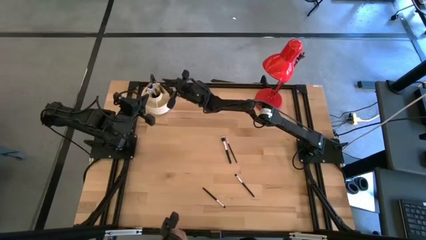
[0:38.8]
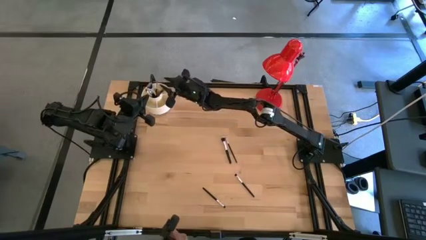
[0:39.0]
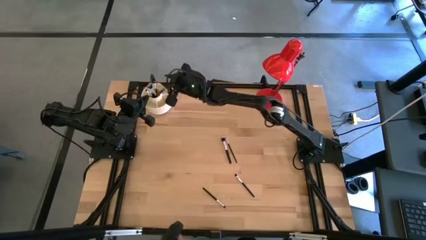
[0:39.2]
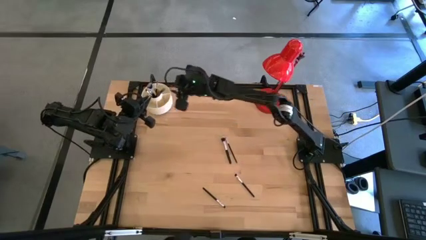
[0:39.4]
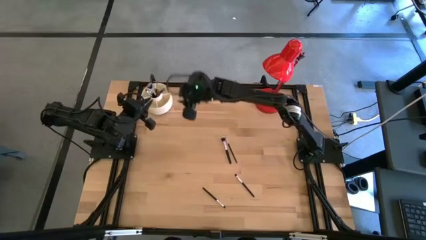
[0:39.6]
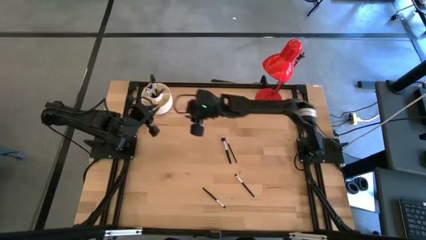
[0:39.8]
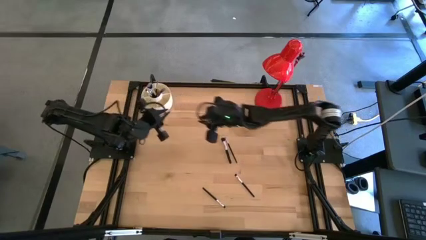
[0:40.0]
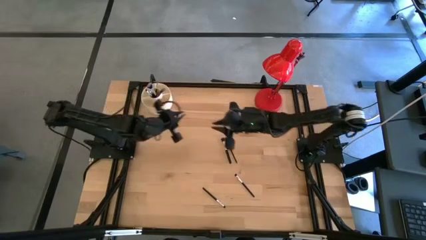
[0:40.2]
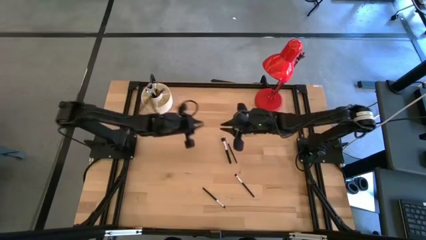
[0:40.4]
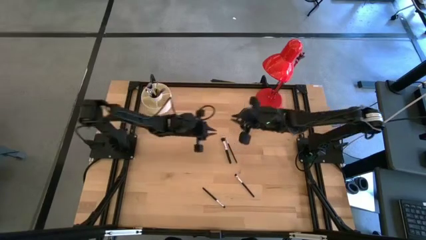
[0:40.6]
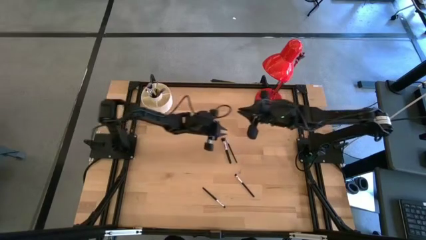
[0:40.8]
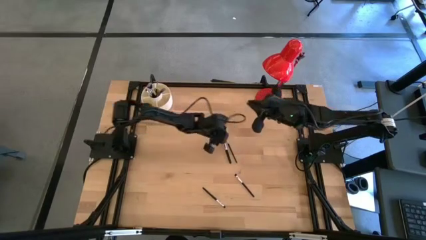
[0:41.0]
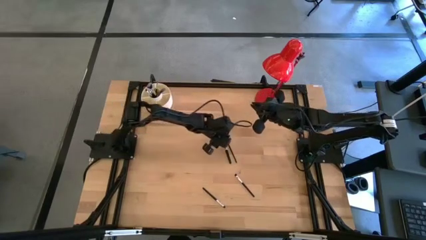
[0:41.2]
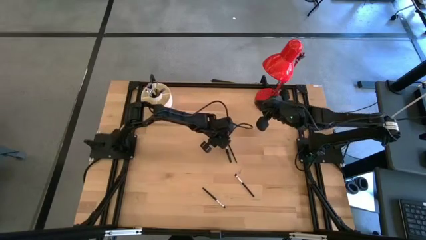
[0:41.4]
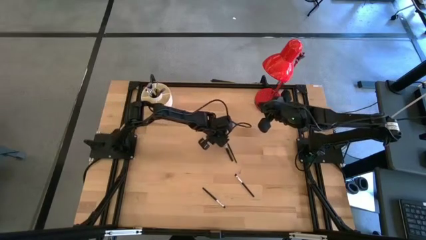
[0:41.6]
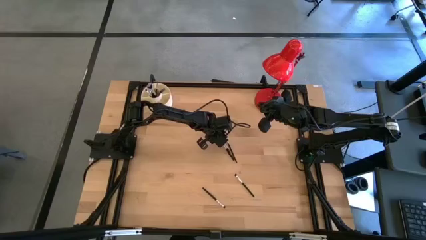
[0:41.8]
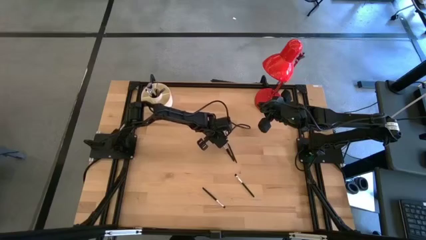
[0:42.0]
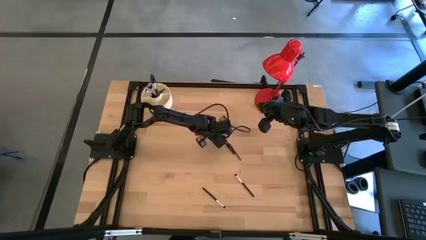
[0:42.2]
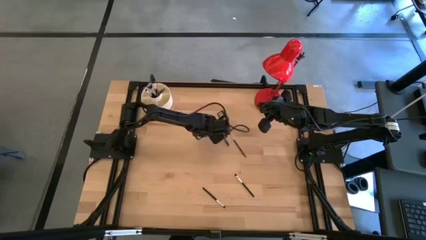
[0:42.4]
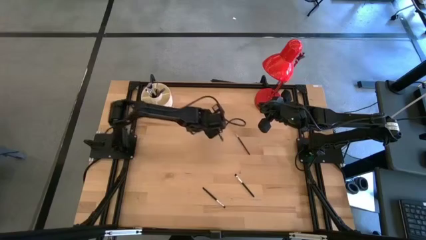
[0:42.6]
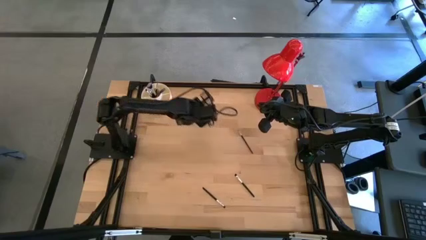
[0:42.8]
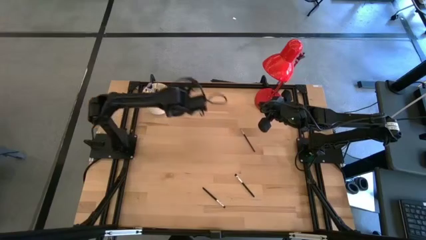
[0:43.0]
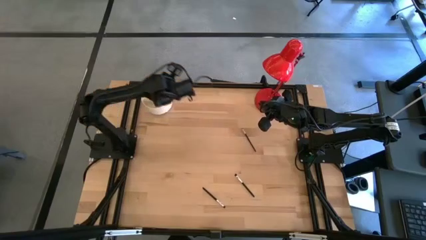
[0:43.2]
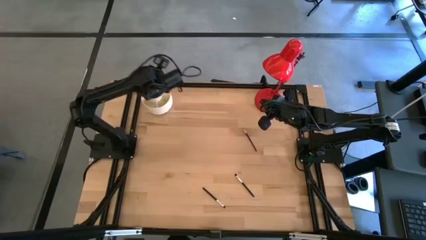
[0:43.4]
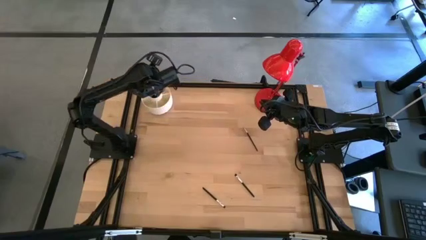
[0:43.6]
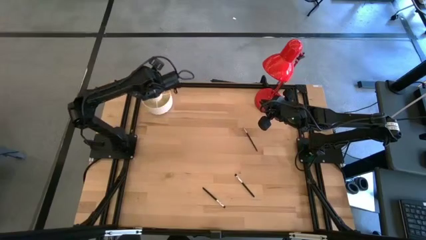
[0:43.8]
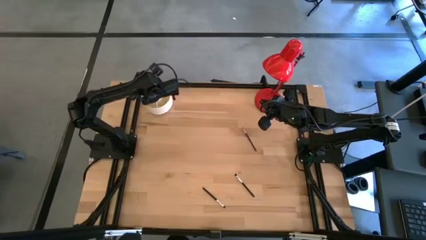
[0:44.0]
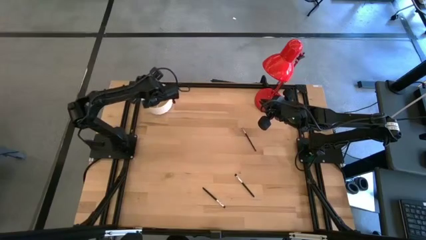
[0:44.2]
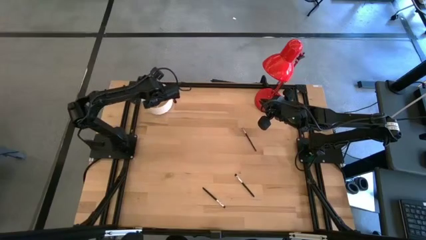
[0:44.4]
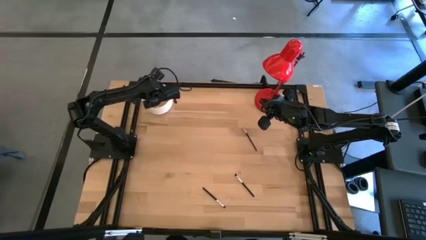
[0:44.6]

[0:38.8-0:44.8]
Task: Put items in baskets/containers
Put the blush brush into the organizer

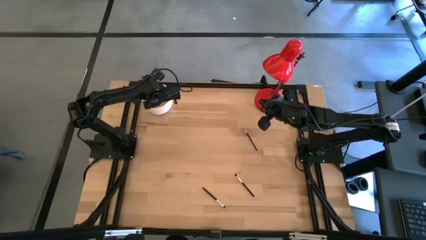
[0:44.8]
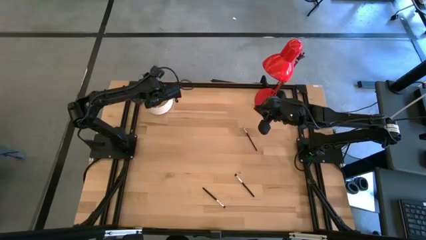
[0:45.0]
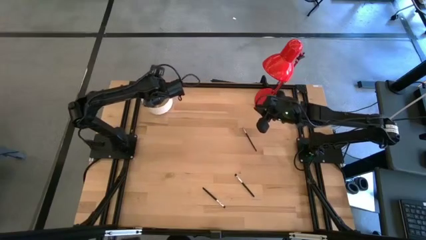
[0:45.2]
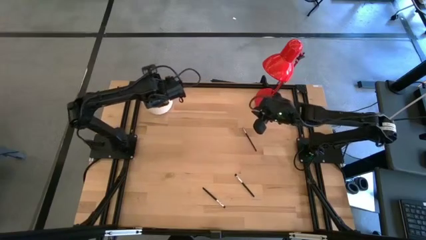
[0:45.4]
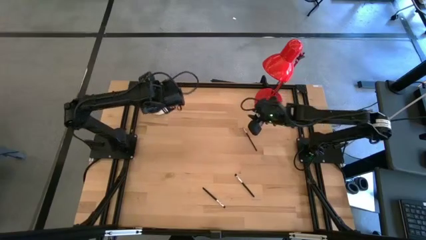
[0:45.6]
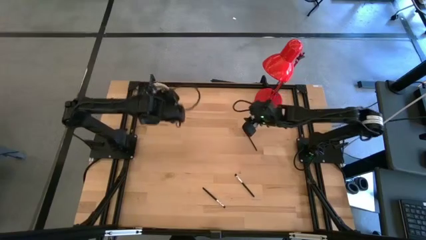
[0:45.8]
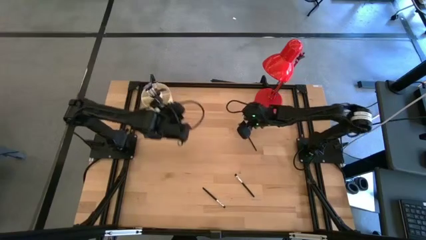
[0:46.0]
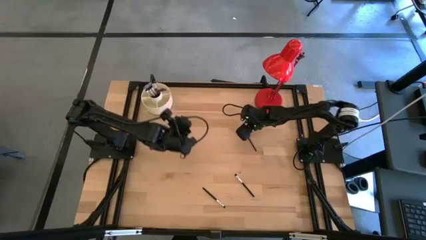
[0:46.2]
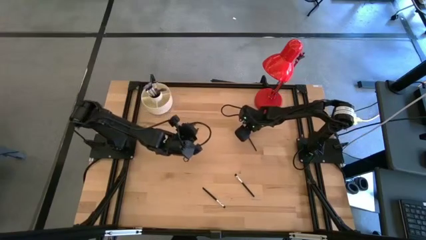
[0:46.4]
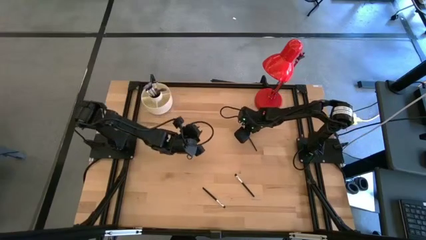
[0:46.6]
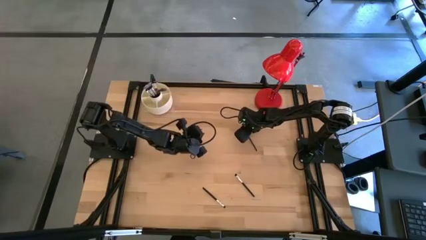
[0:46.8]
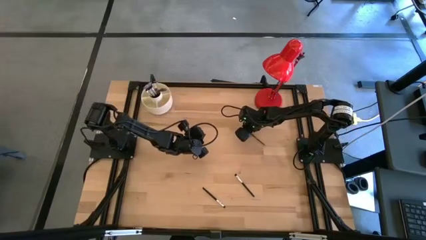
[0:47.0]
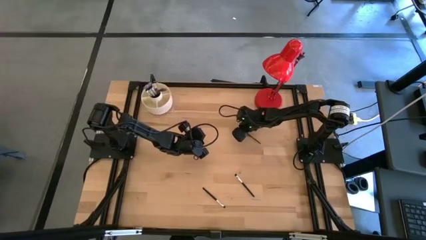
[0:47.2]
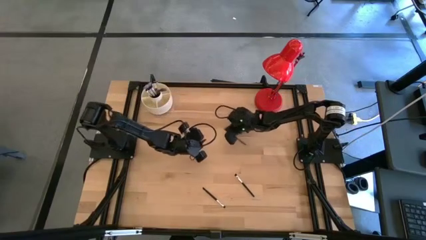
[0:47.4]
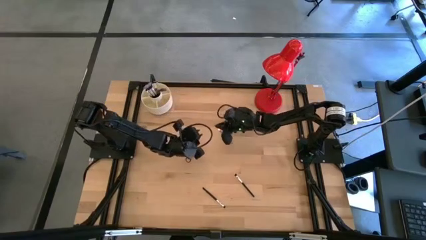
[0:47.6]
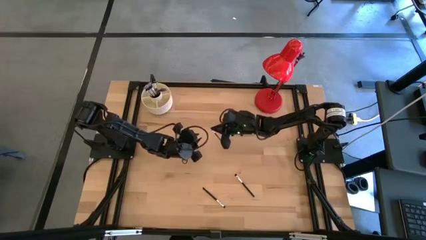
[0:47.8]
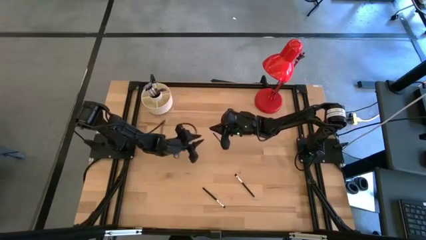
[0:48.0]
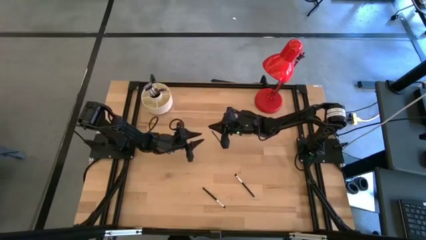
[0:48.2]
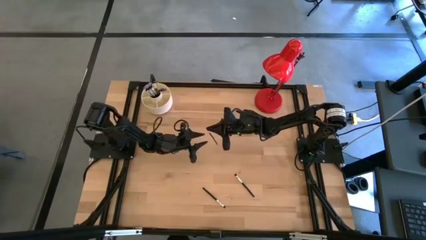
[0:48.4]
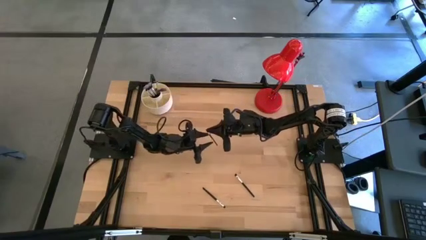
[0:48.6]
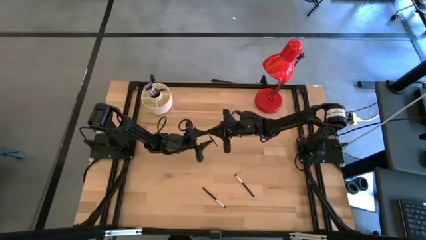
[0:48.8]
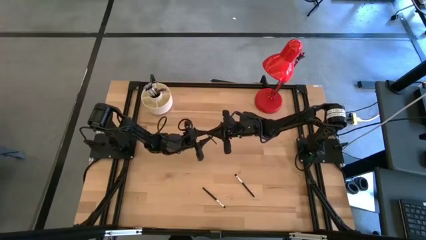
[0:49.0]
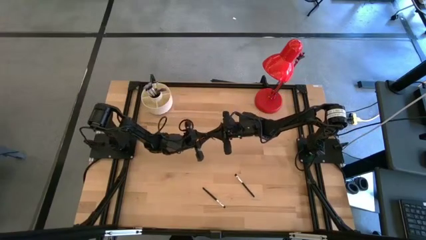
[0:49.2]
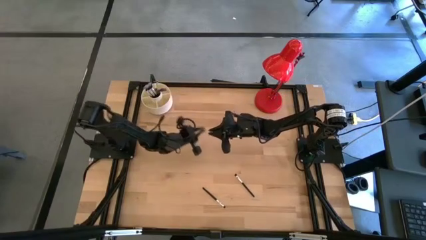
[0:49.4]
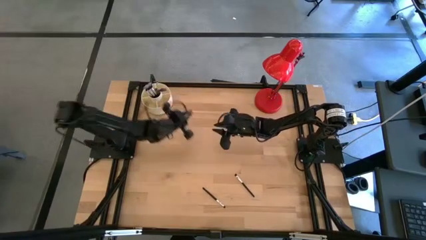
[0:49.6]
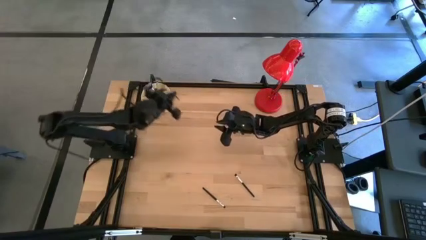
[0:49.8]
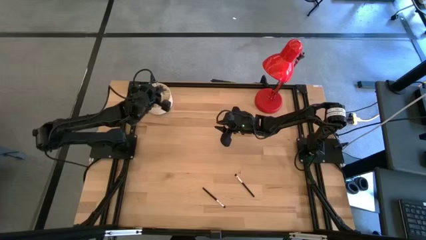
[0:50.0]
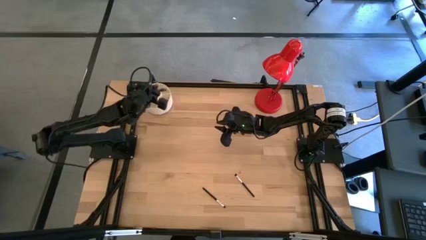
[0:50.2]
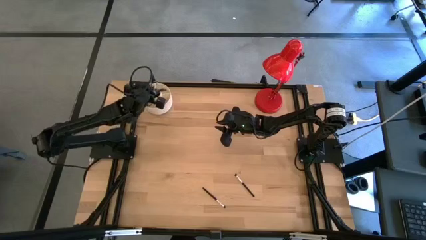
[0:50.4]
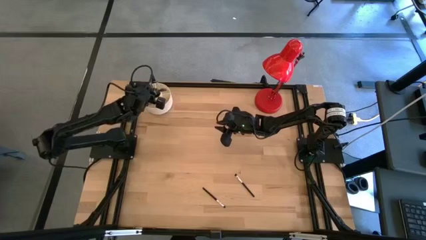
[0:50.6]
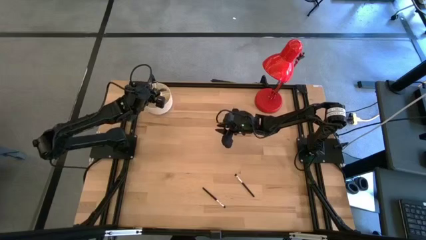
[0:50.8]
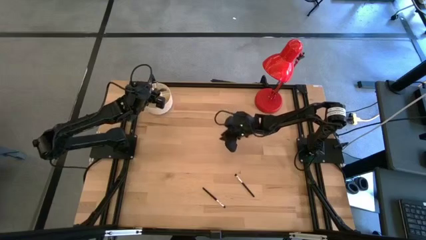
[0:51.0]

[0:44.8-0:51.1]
Put the eyeshadow brush into the organizer

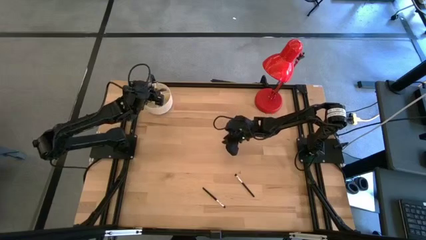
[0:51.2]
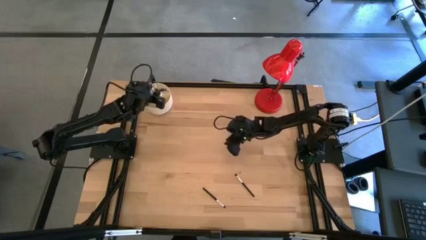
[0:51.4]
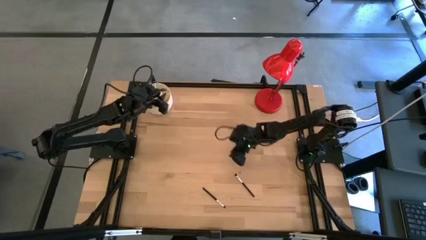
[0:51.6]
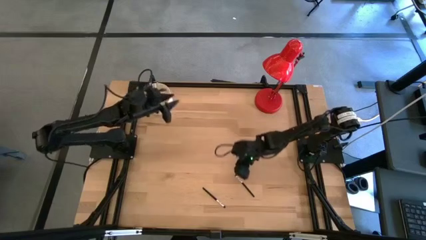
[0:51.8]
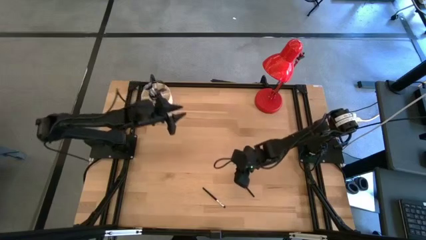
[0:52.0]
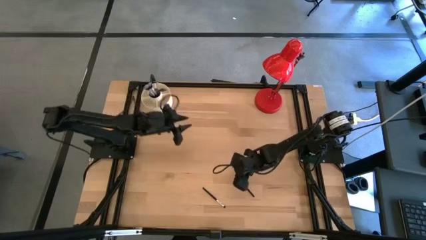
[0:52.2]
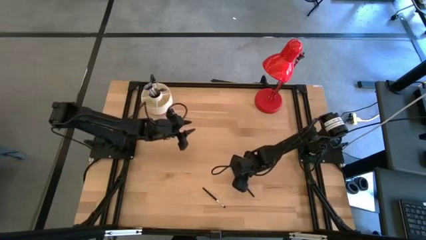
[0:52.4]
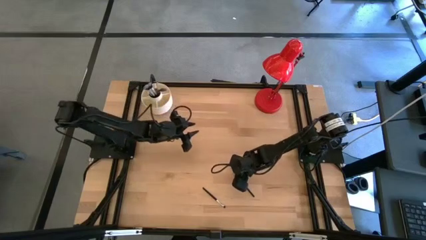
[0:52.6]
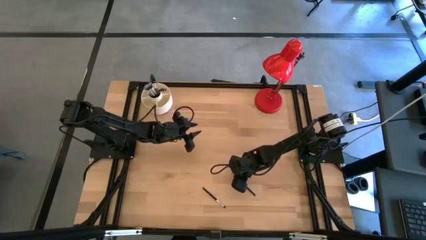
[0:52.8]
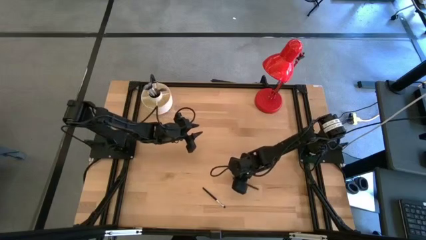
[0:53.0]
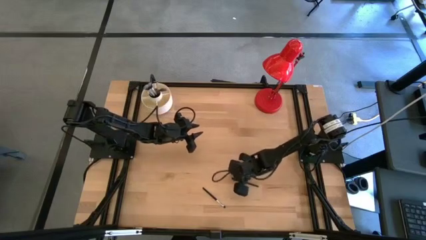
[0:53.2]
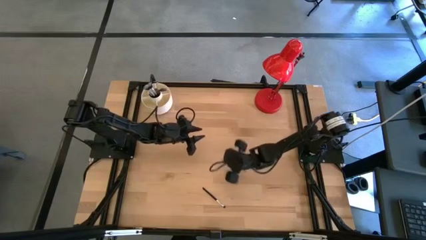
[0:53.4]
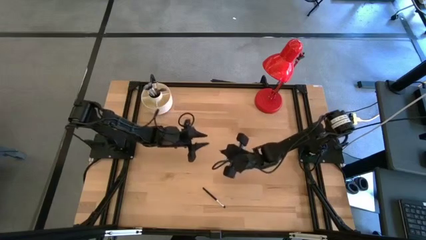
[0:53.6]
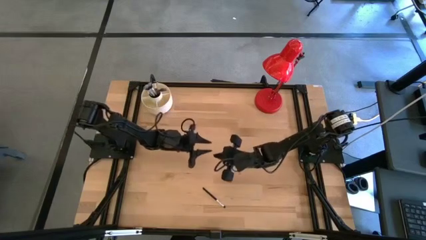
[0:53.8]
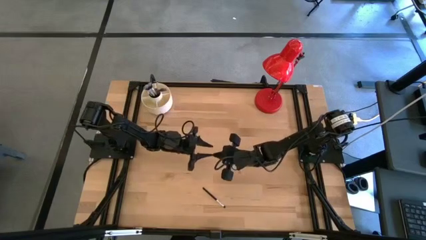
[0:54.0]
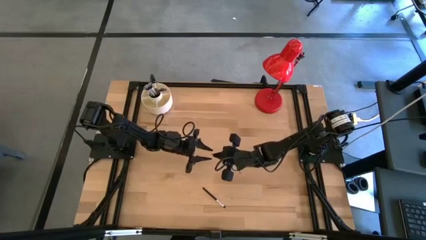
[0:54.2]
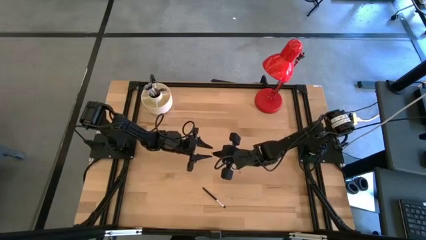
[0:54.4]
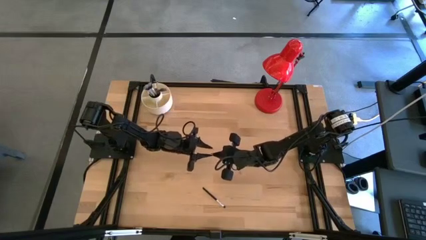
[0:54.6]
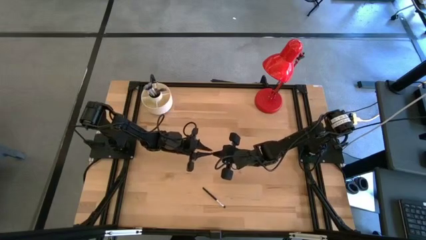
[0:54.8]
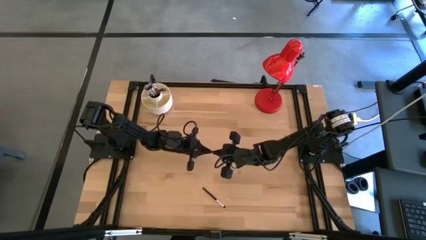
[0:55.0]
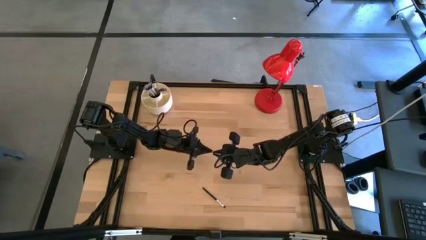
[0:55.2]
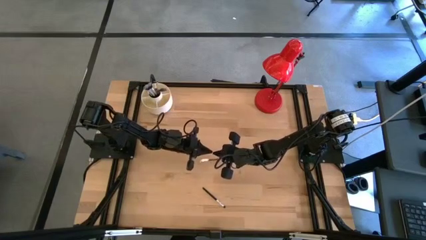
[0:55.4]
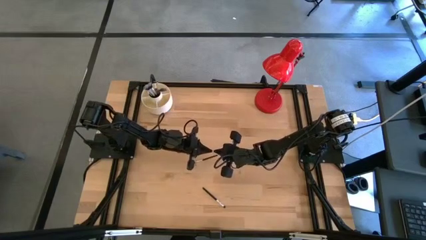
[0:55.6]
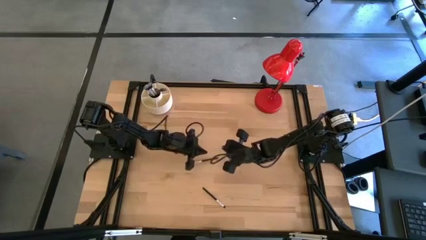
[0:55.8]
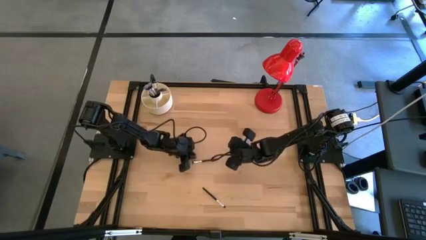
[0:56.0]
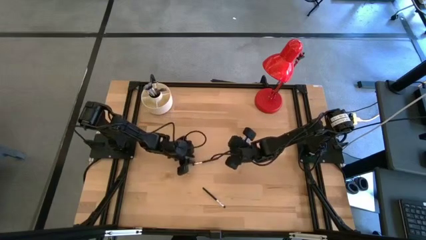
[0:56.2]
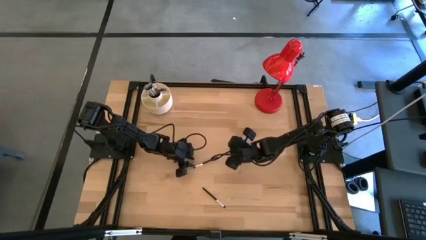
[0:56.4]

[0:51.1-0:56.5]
Put the eyeshadow brush into the organizer

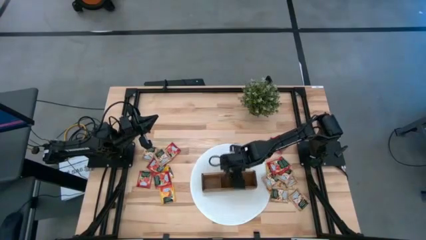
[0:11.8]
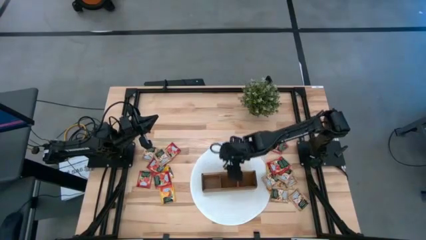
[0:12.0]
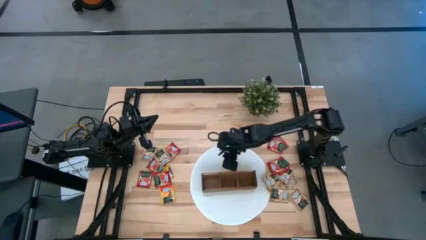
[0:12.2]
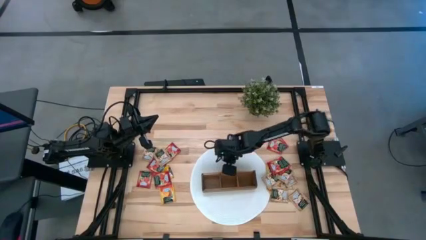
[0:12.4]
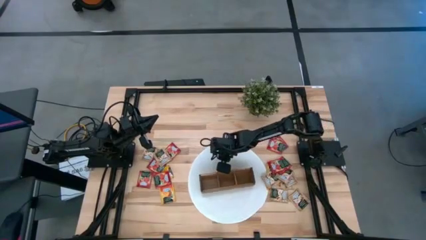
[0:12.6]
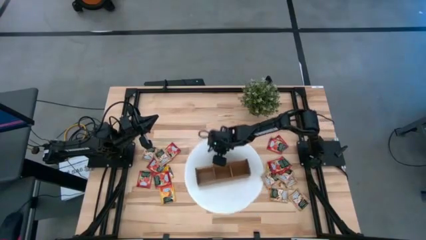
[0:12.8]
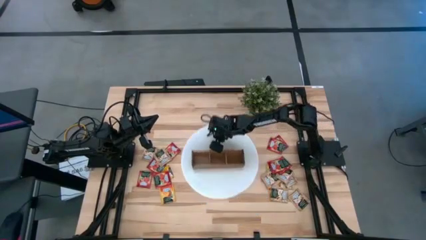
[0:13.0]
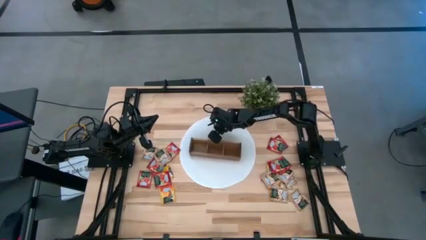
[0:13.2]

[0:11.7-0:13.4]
Task: Pick & Place Tea
Move the white mat to the middle of the table
